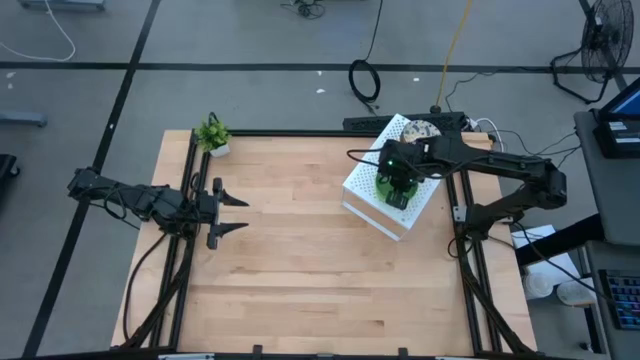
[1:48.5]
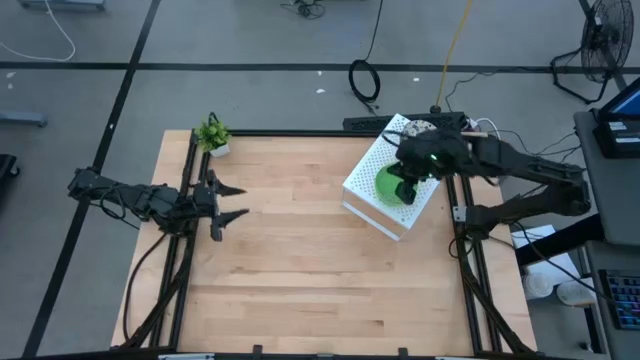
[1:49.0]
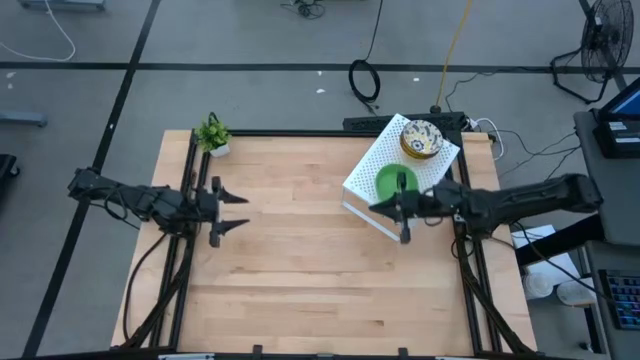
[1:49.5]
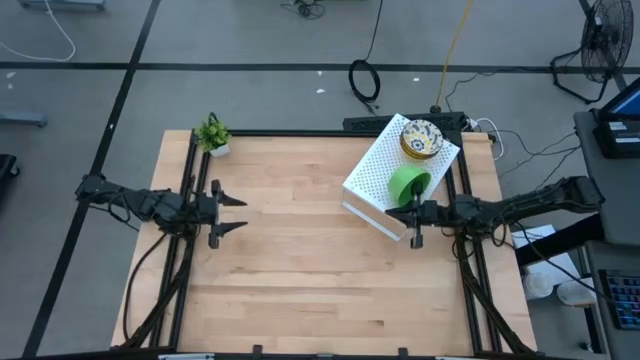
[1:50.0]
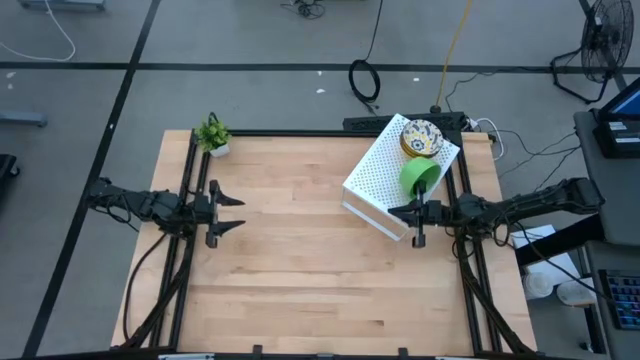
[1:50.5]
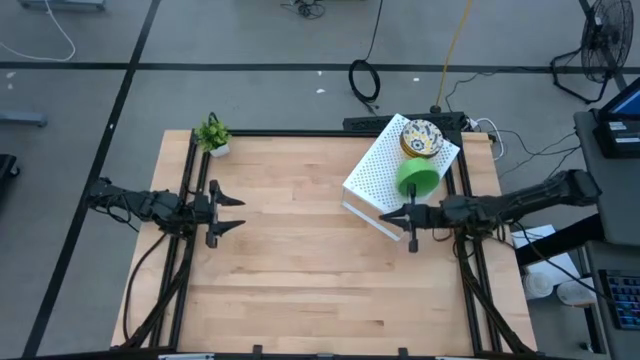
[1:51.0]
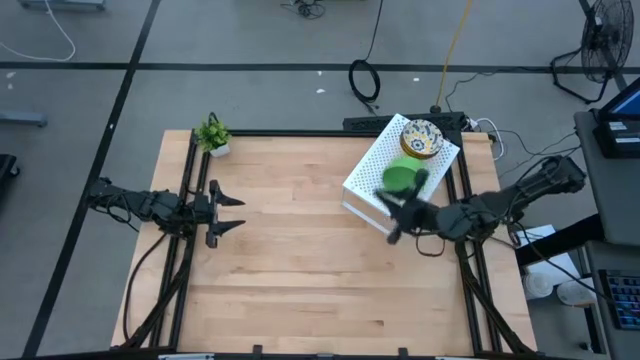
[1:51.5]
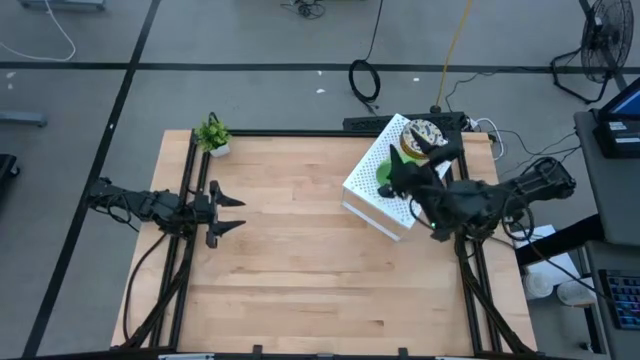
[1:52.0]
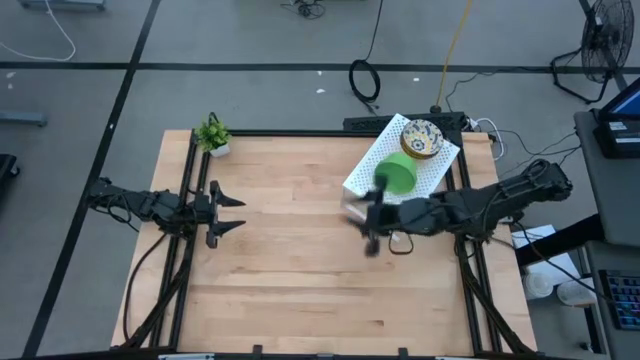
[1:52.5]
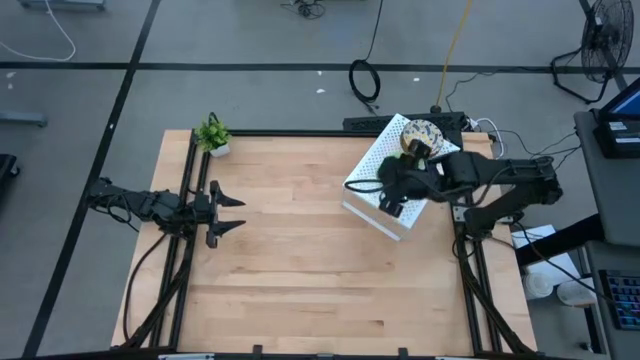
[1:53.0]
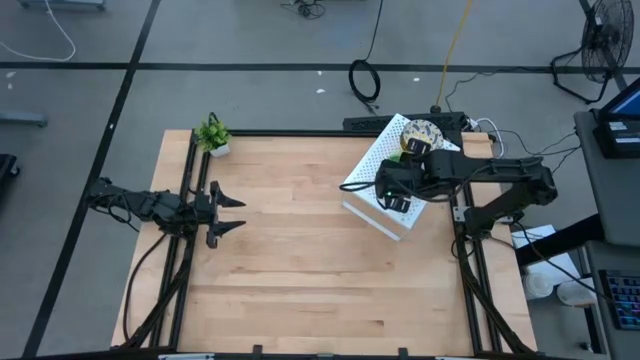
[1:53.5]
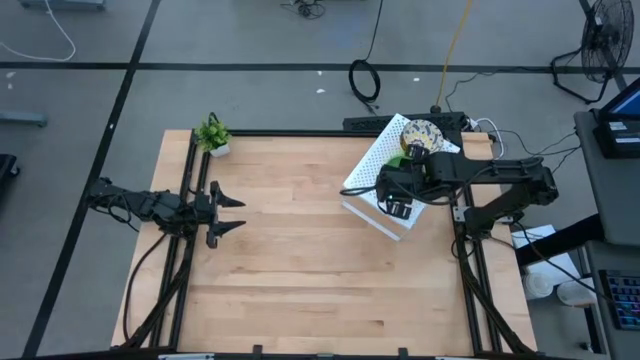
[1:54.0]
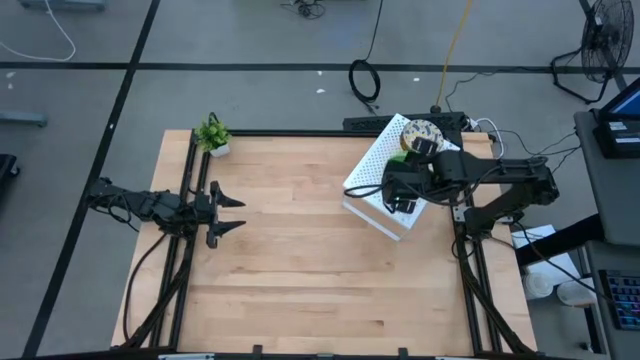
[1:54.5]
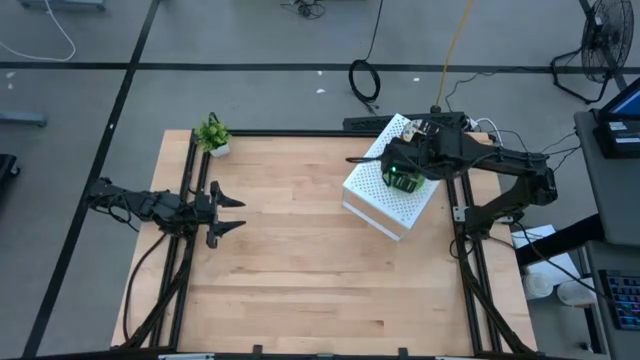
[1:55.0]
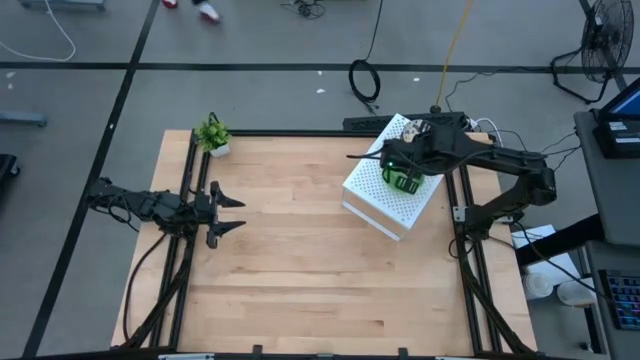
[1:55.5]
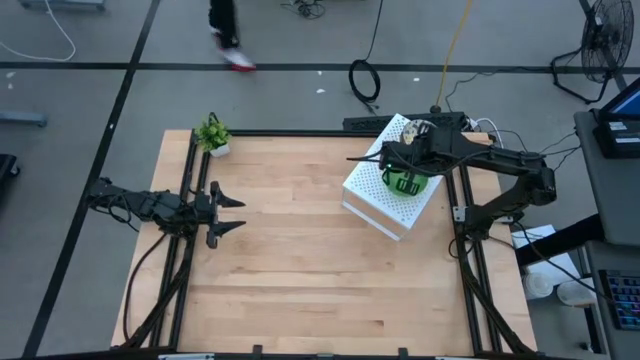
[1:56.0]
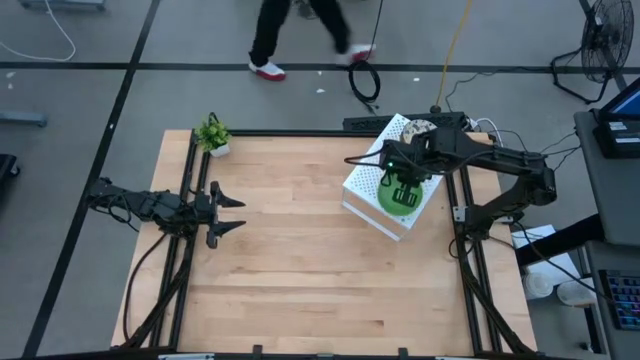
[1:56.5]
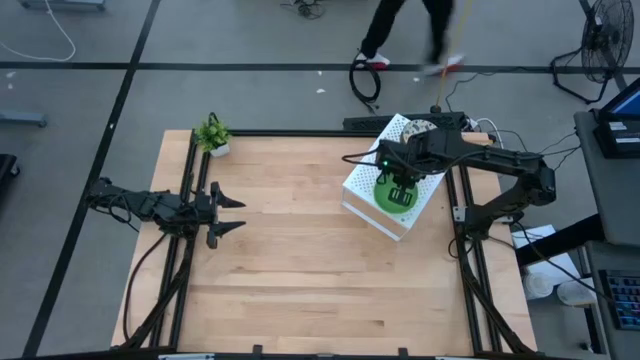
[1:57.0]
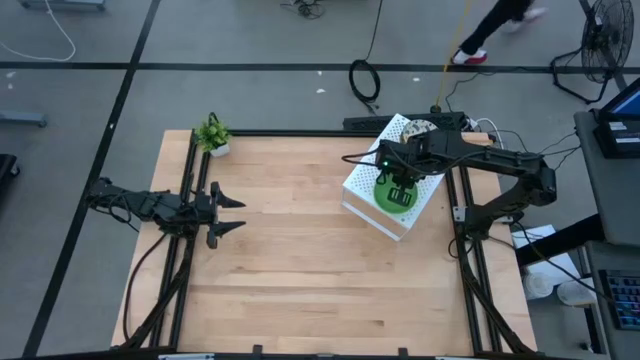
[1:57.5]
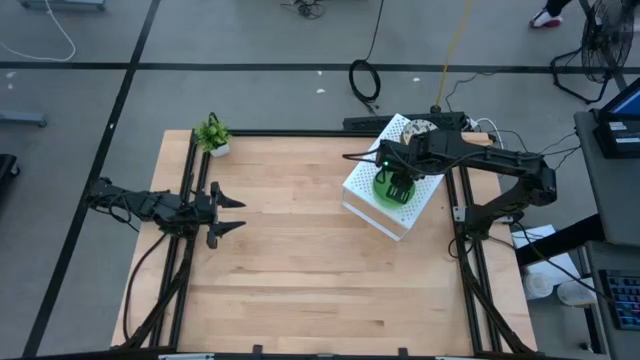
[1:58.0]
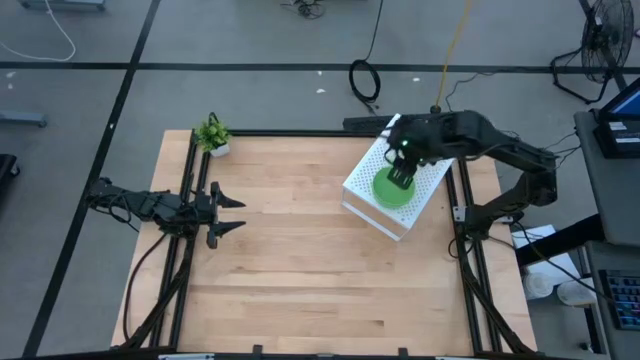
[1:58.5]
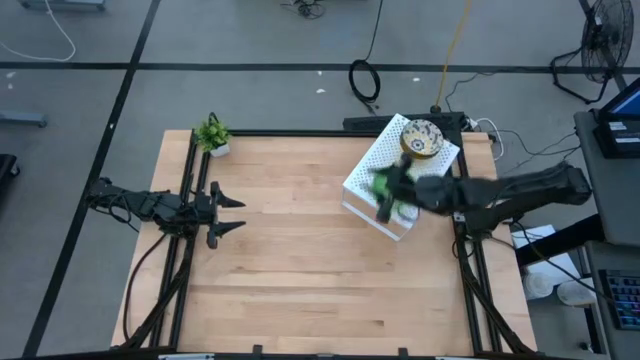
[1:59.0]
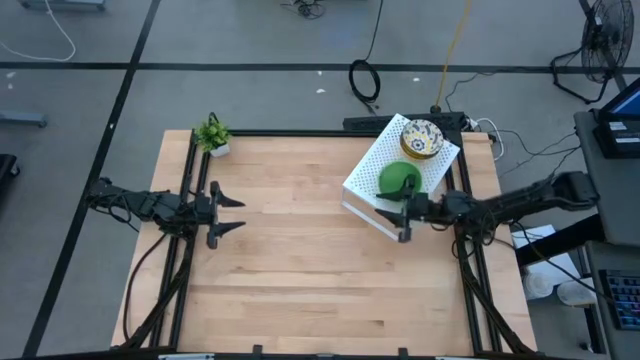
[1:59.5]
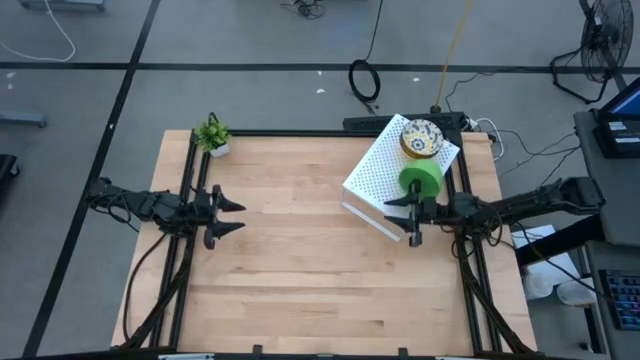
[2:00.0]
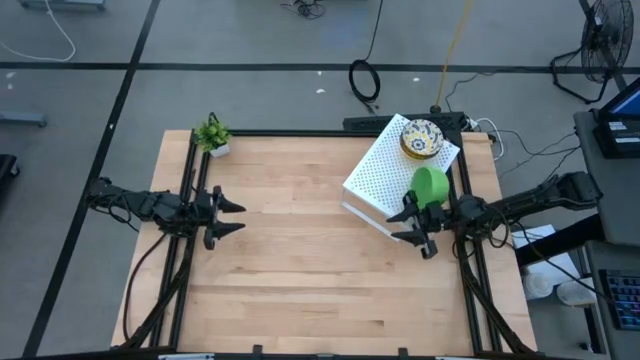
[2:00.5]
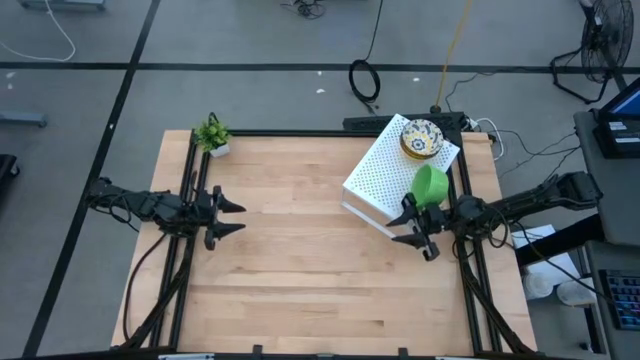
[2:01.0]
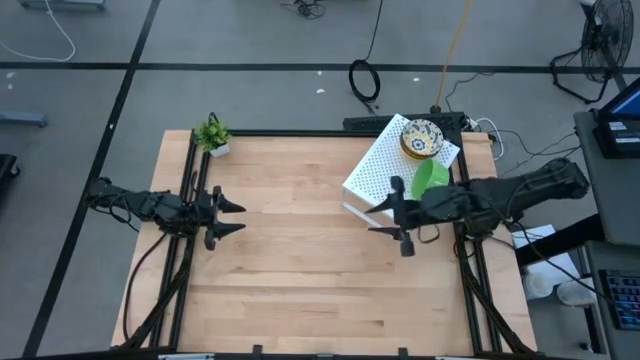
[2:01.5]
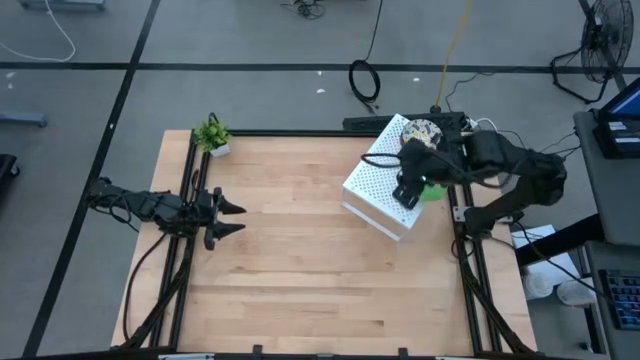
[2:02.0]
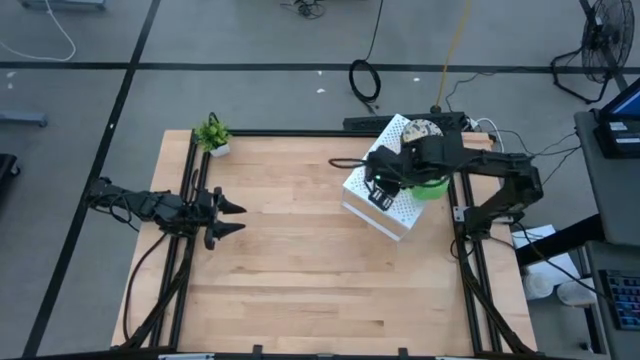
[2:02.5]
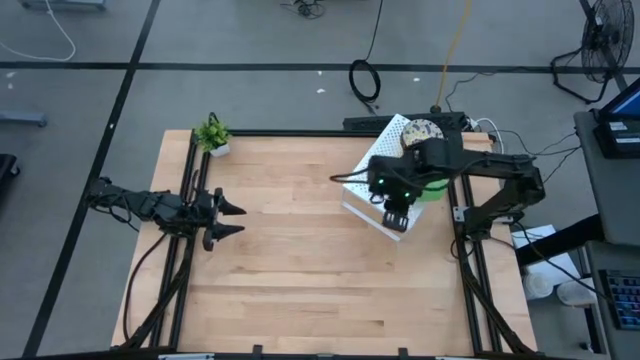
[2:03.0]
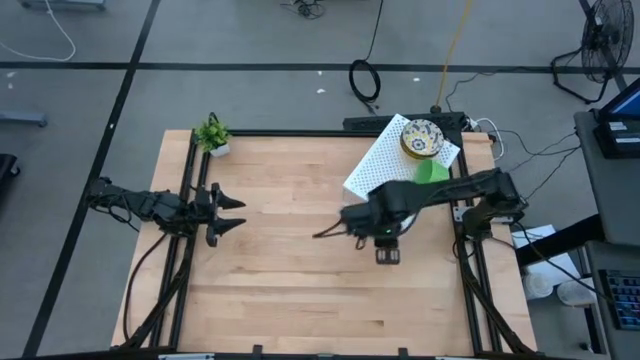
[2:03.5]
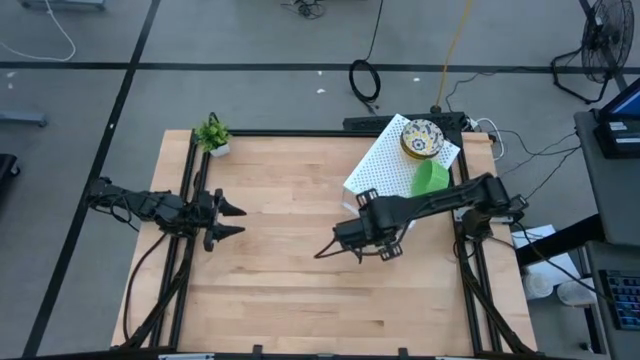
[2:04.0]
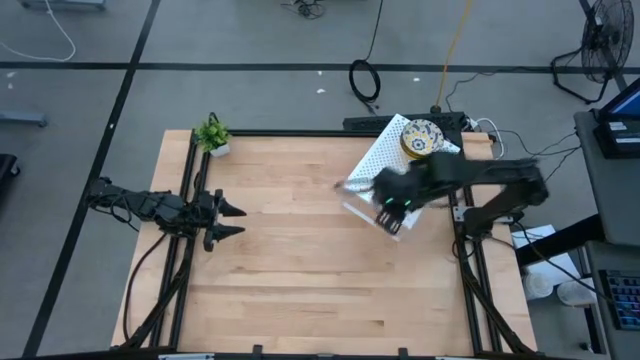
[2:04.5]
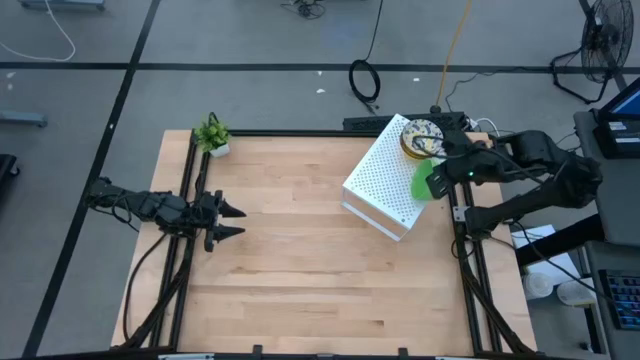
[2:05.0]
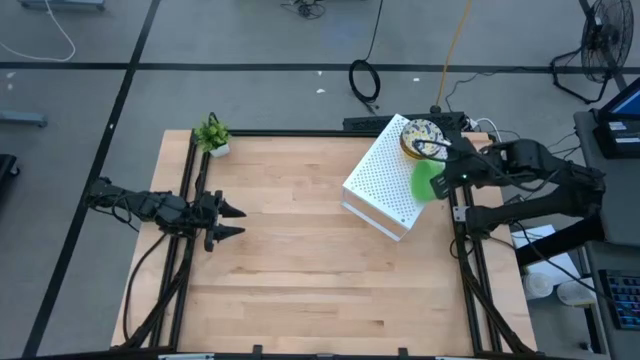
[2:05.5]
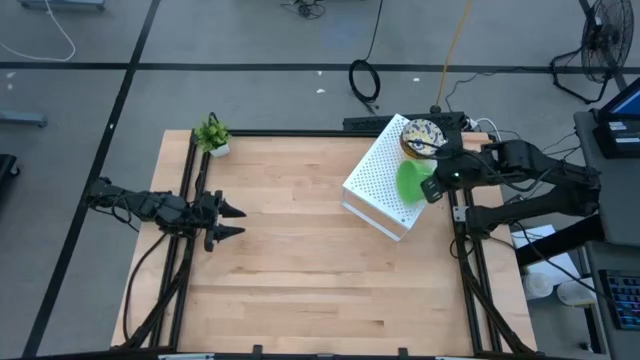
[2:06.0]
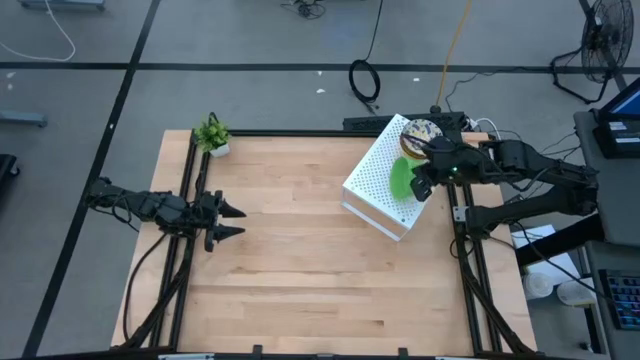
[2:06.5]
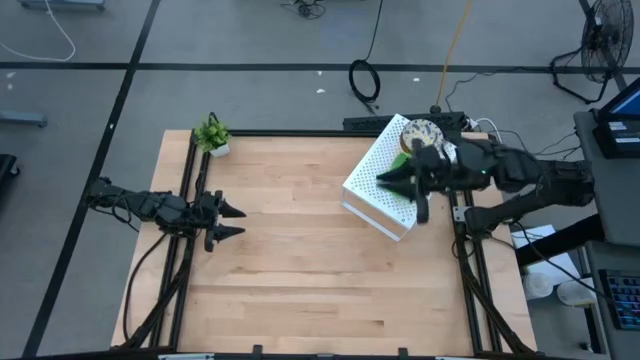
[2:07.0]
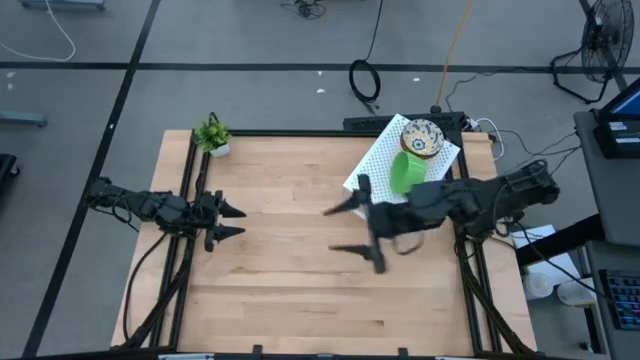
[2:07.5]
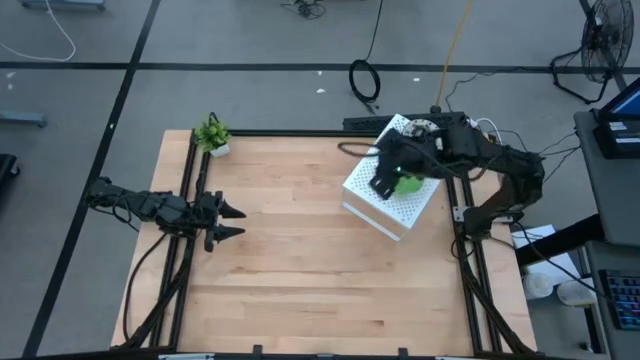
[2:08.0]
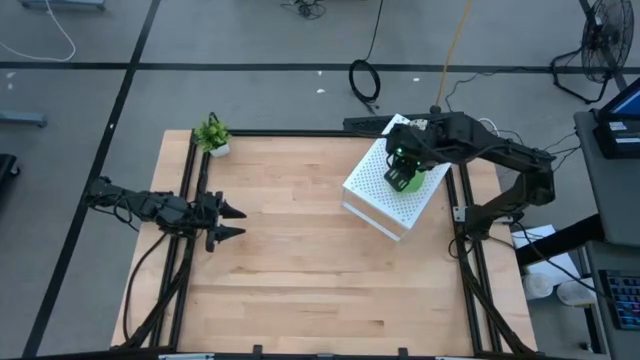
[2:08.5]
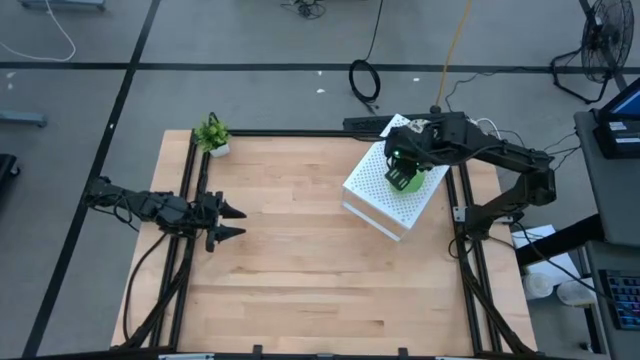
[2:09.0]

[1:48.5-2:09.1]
Task: Pick & Place Mini bowls
Adjust the green bowls on the shelf
